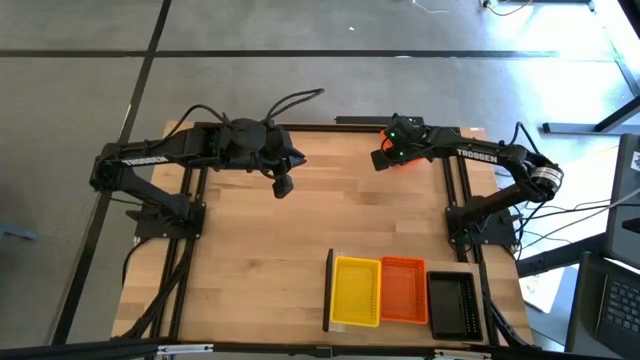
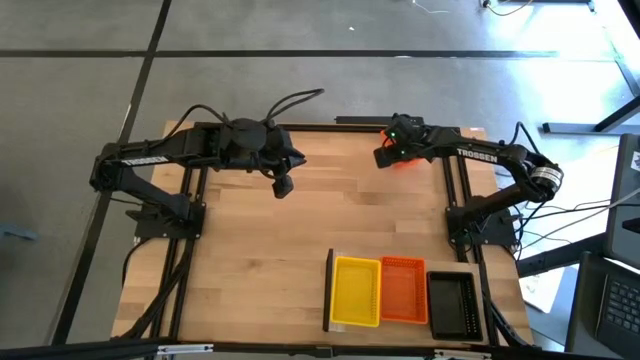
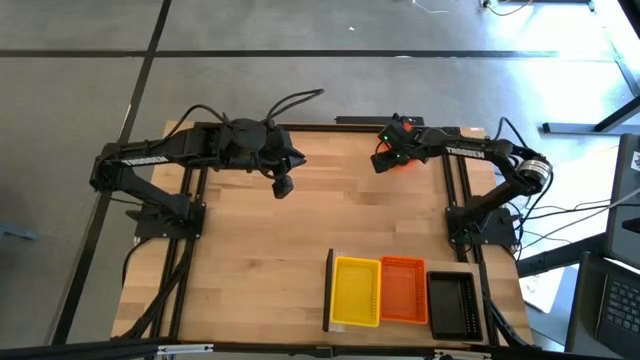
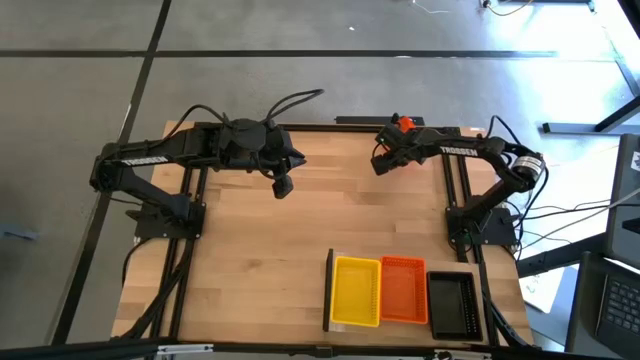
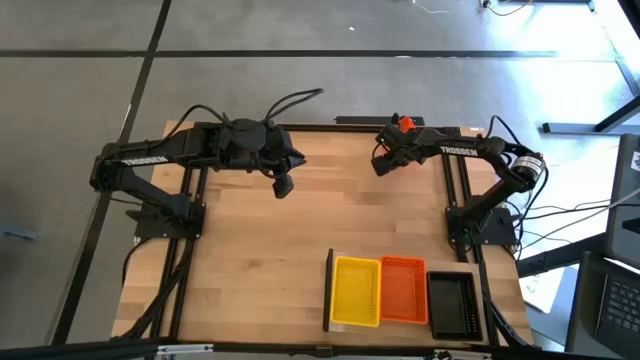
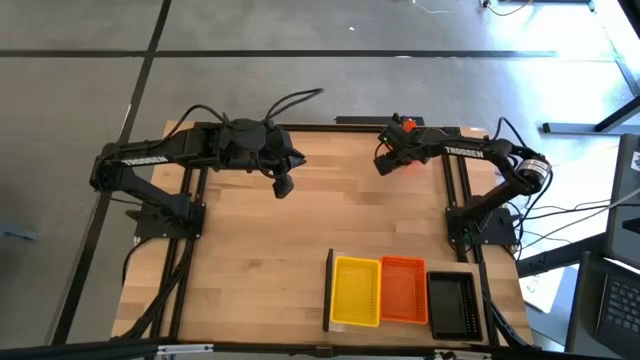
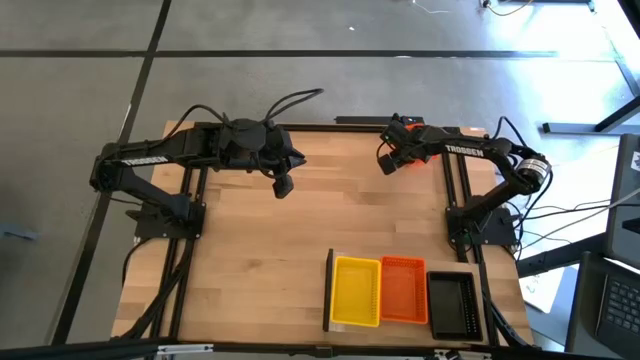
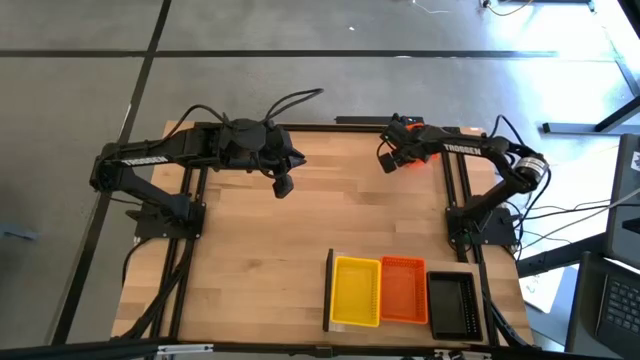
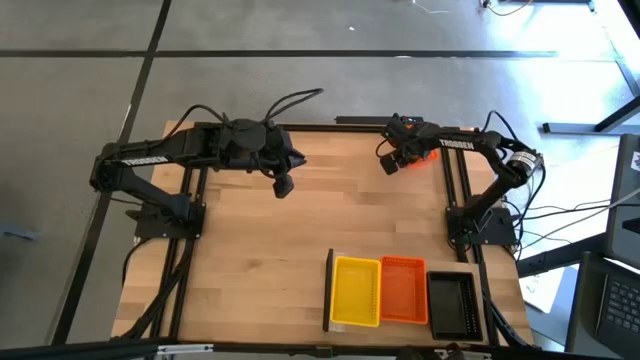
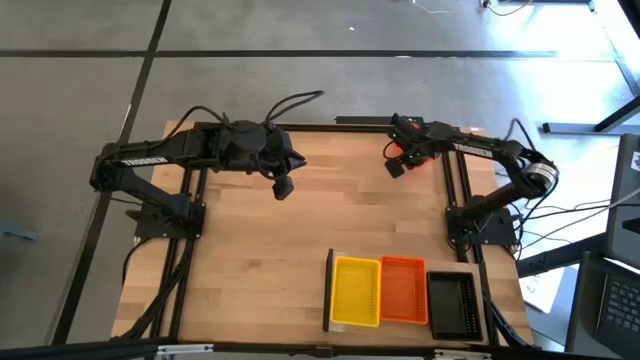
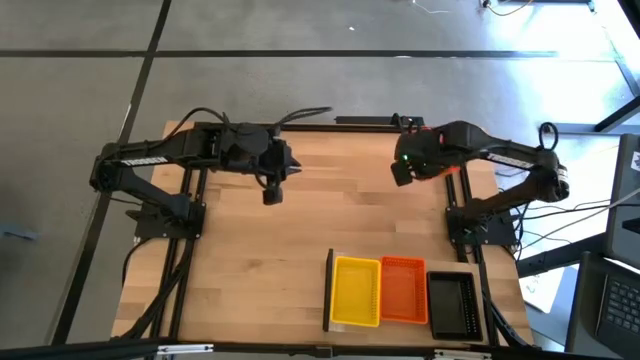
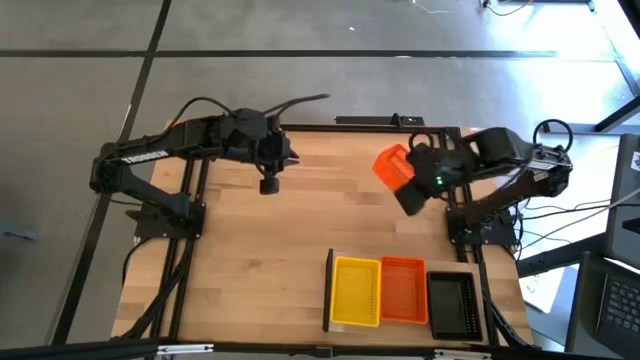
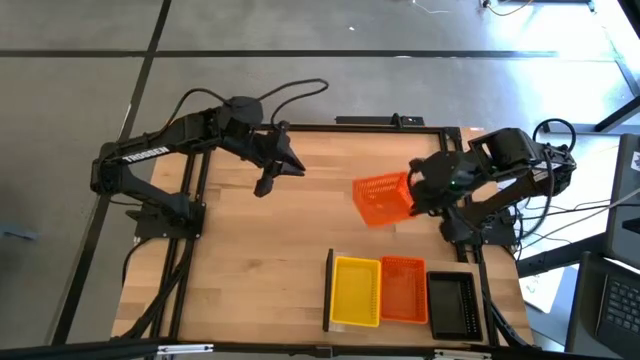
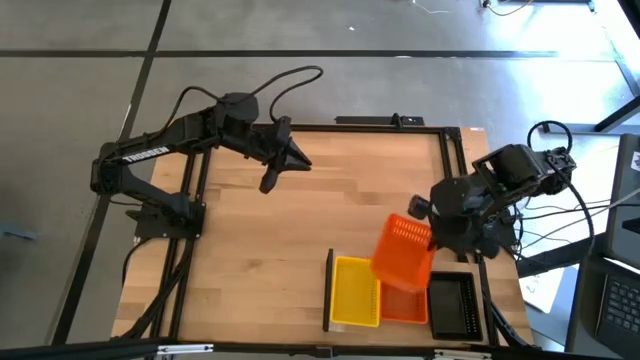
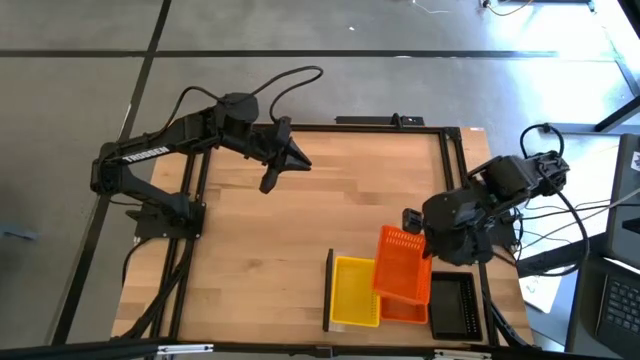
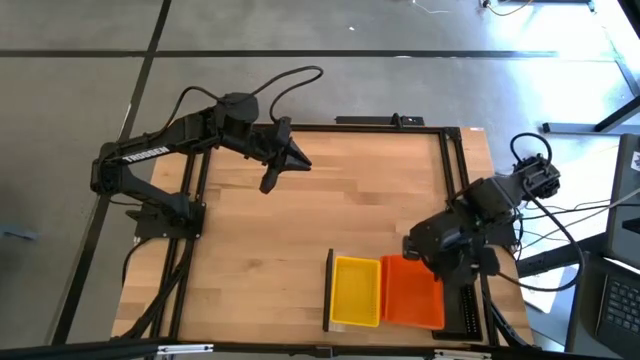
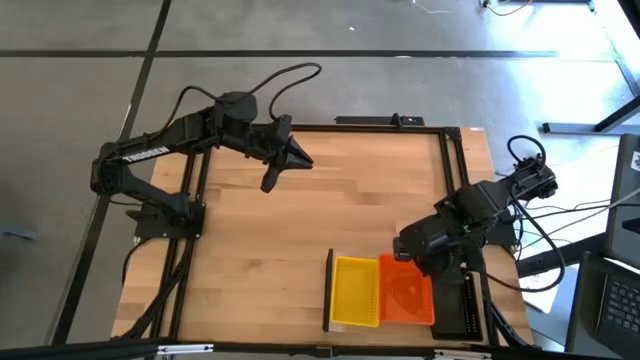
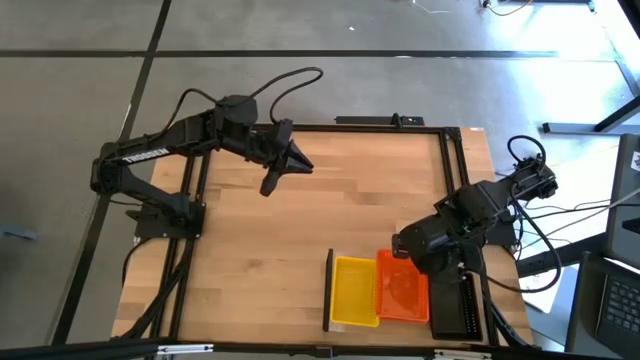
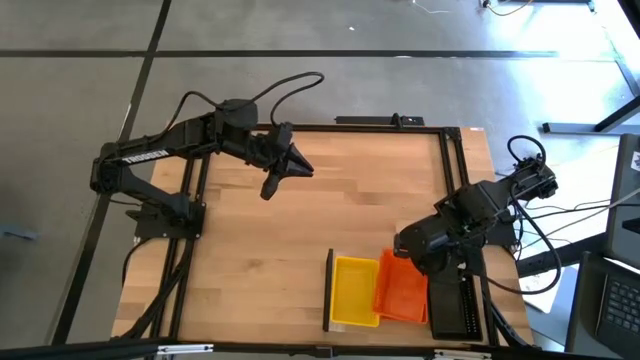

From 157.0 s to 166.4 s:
Task: Stack baskets on shelf by color
Stack the orange bin on top of the orange bin

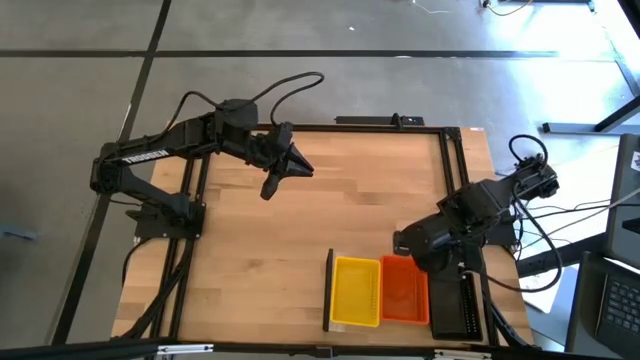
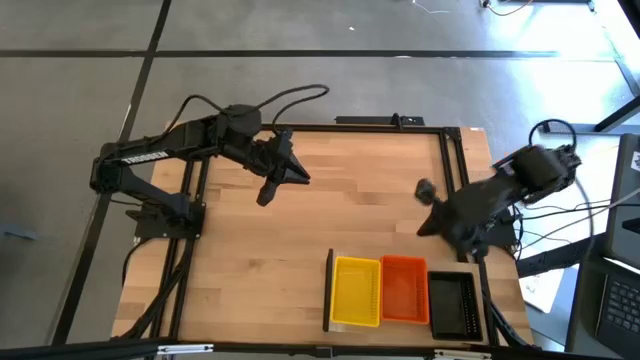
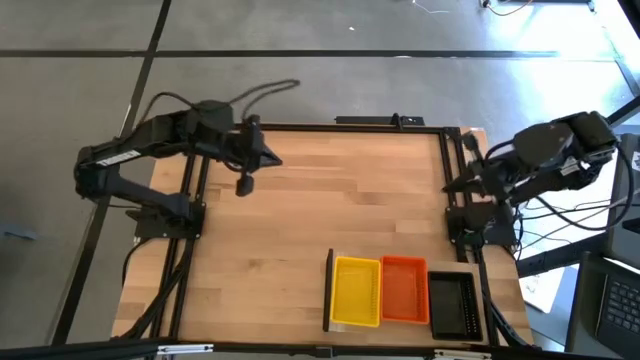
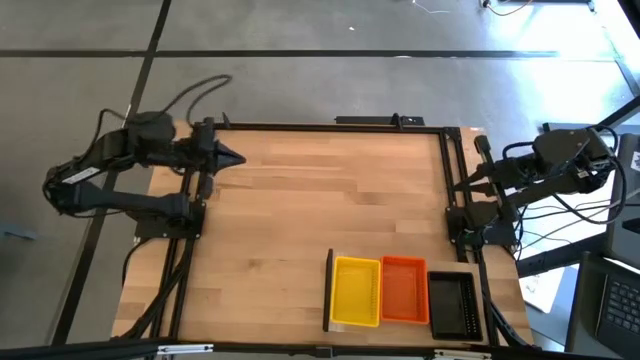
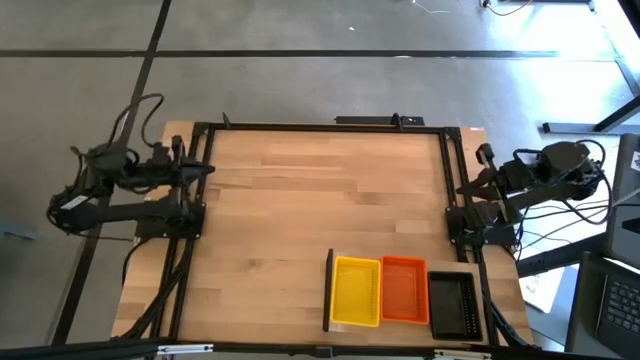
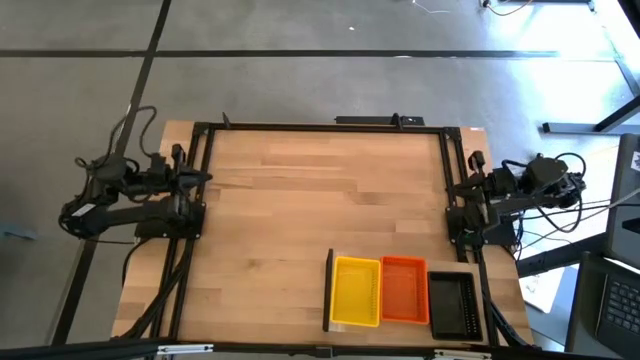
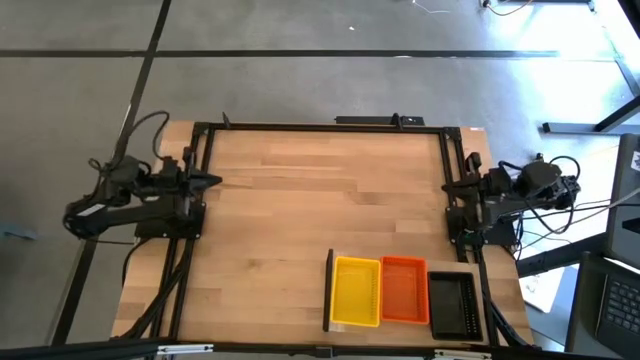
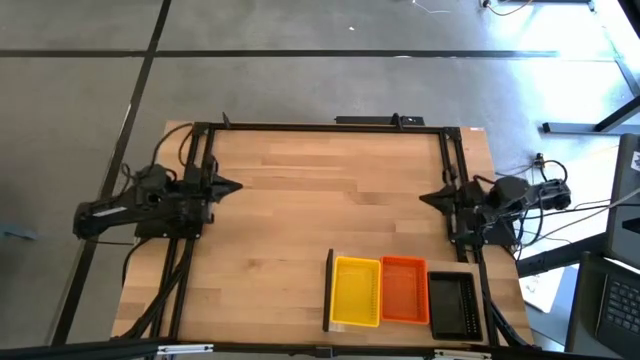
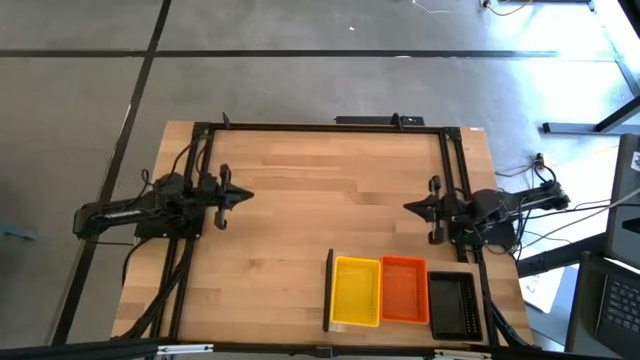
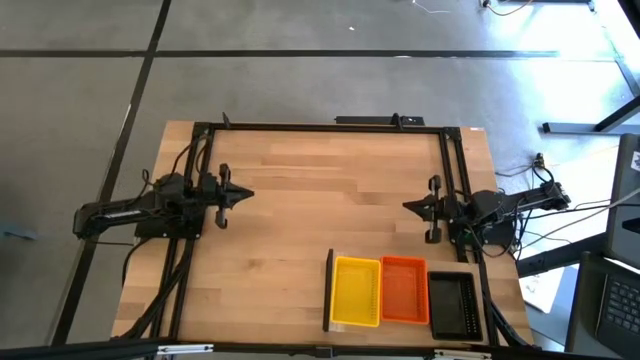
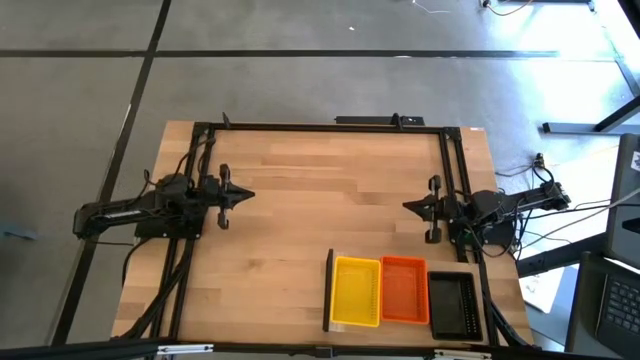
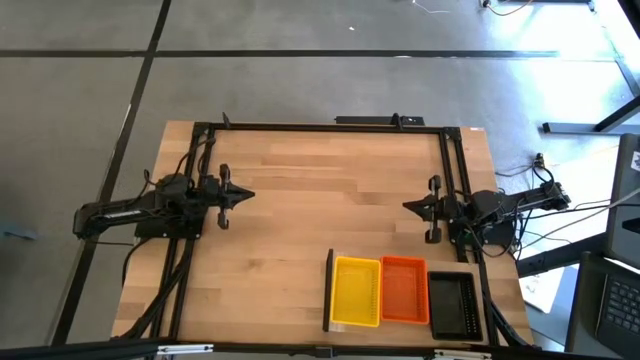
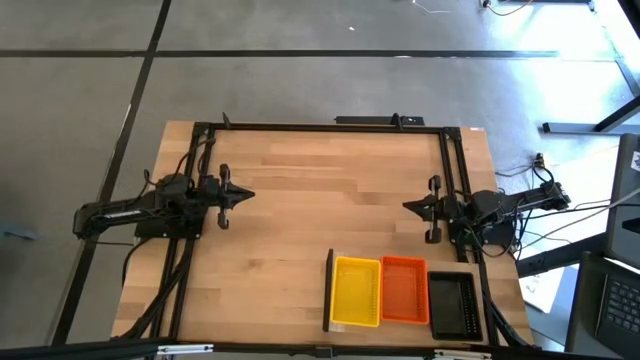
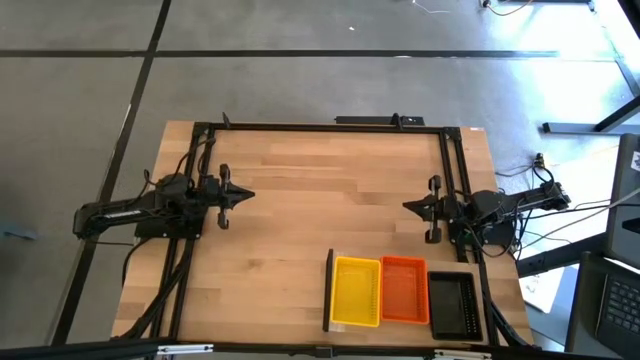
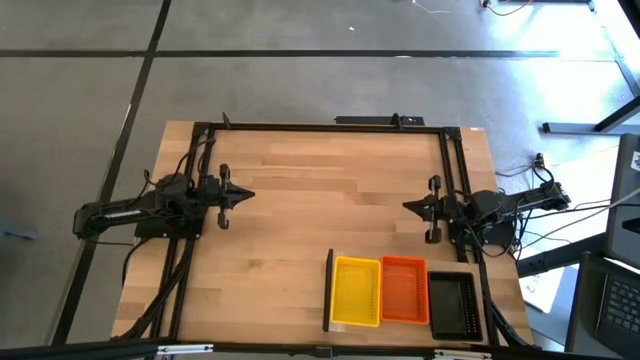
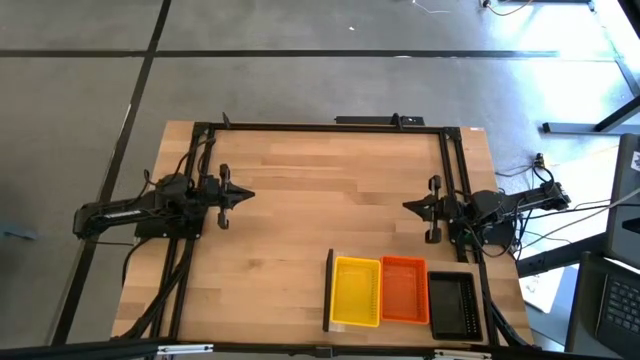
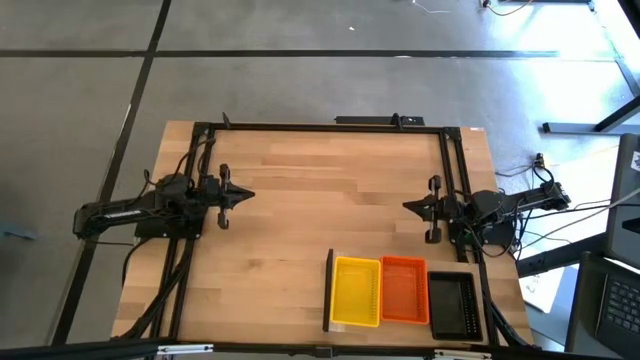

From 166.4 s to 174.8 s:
Return to Home Position

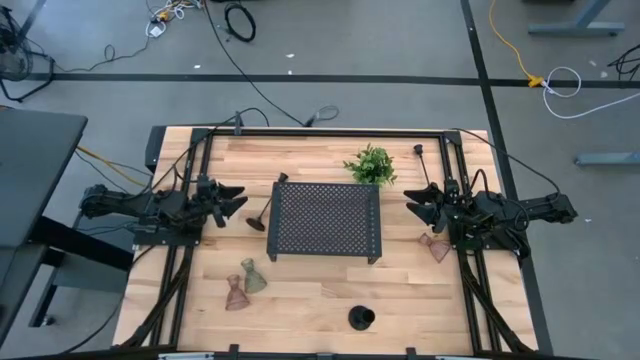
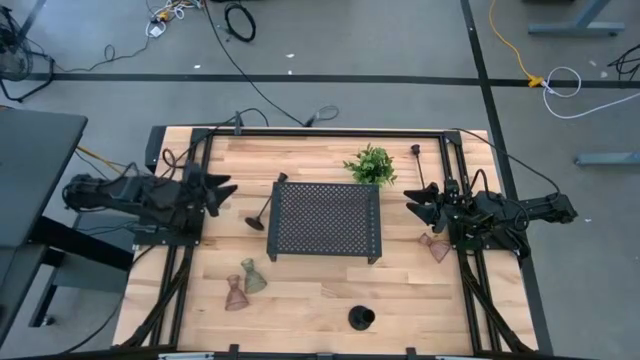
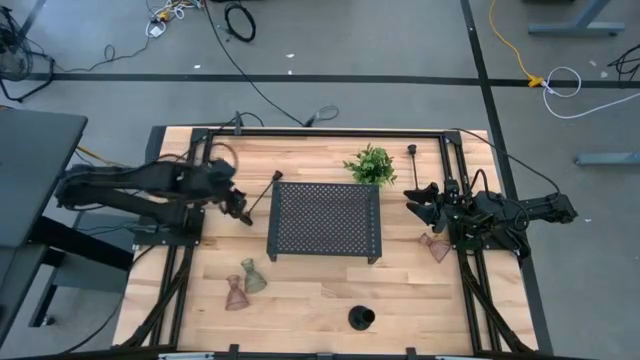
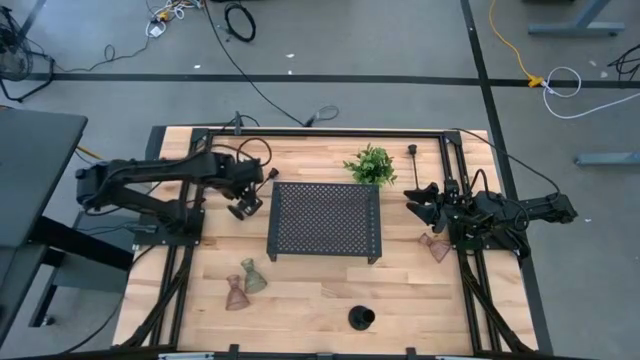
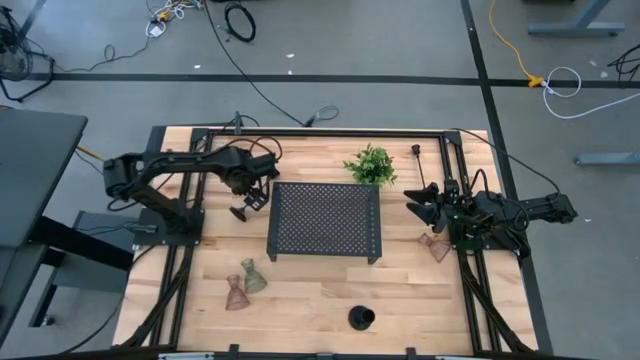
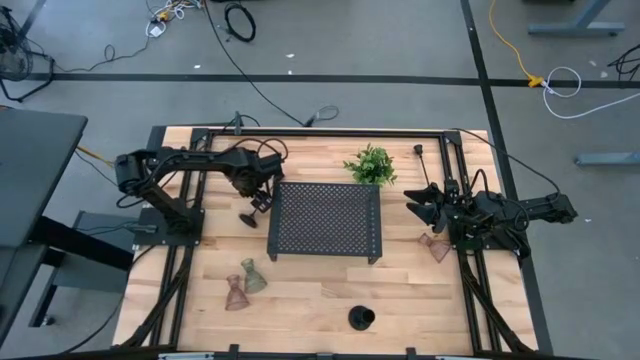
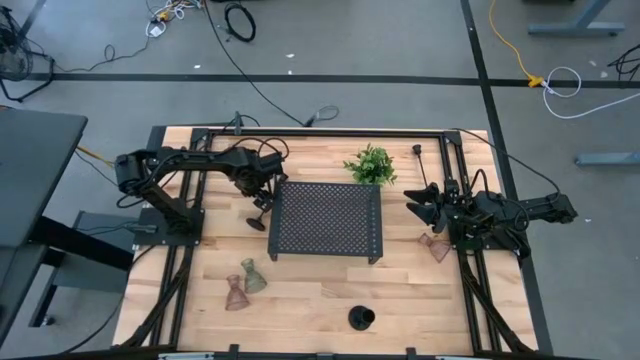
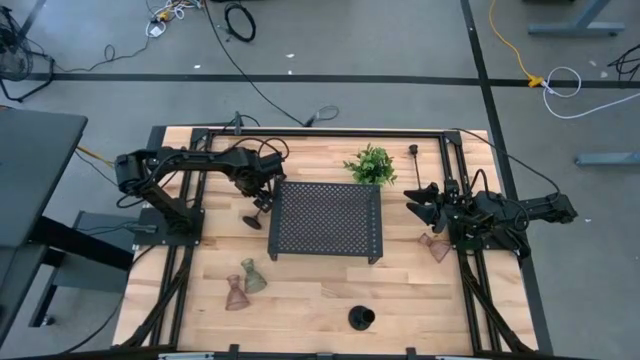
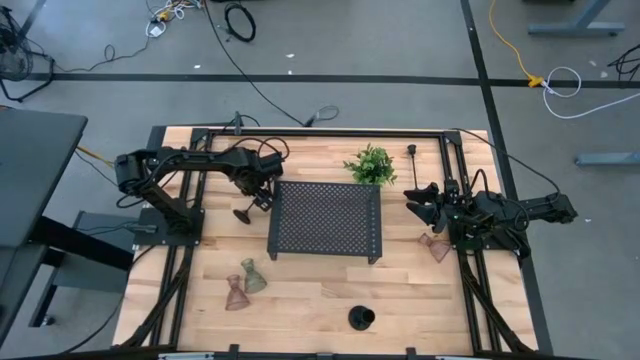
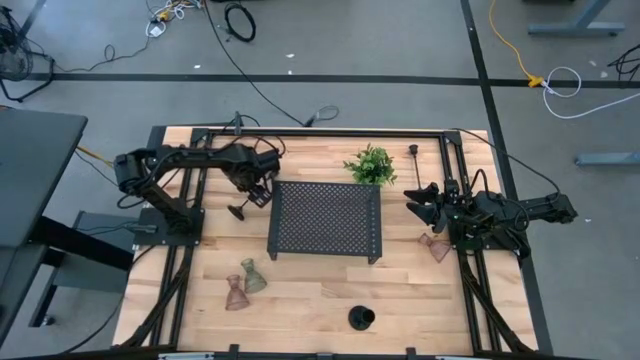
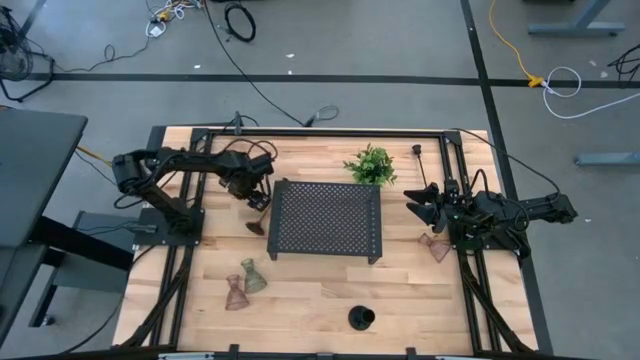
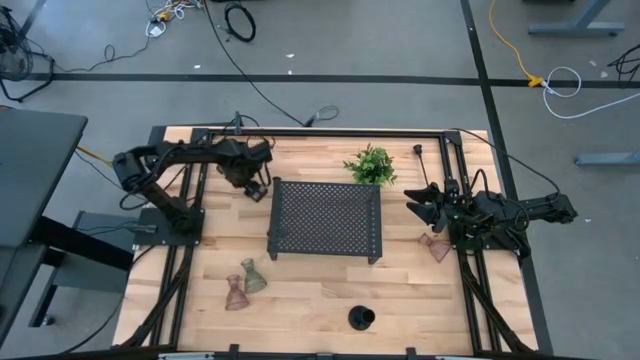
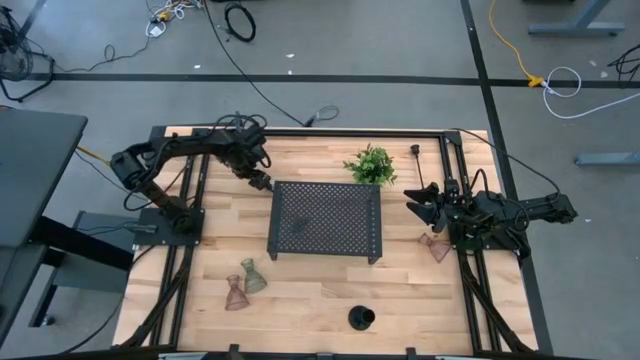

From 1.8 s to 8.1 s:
Task: Pick & Place candle stick holders
Put the left black metal candle holder on the shelf
